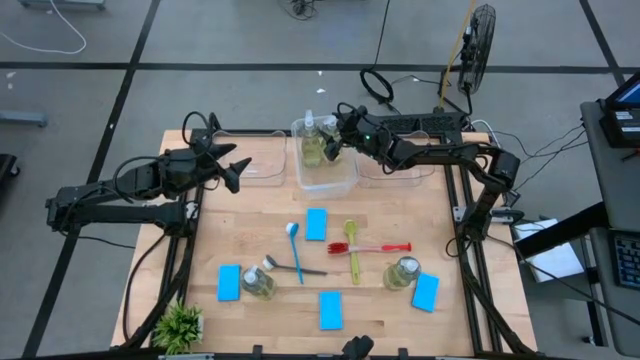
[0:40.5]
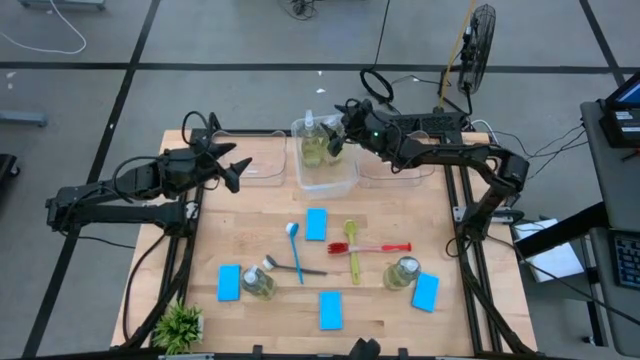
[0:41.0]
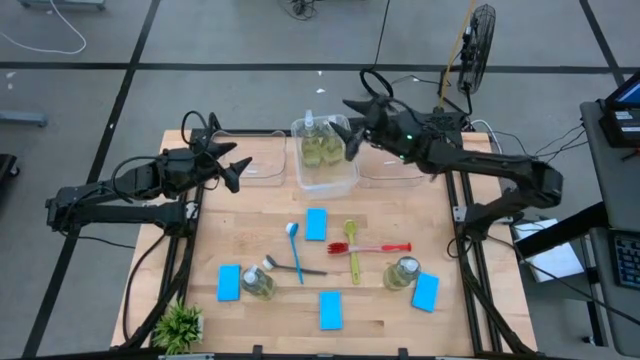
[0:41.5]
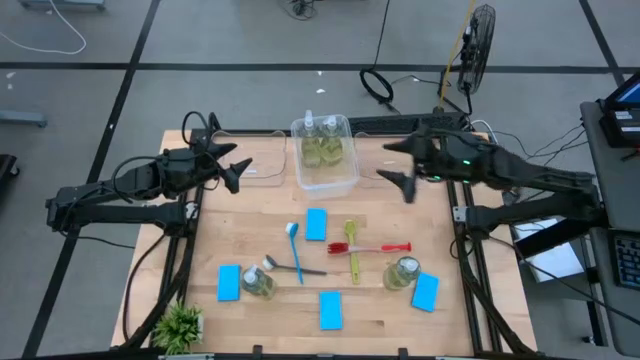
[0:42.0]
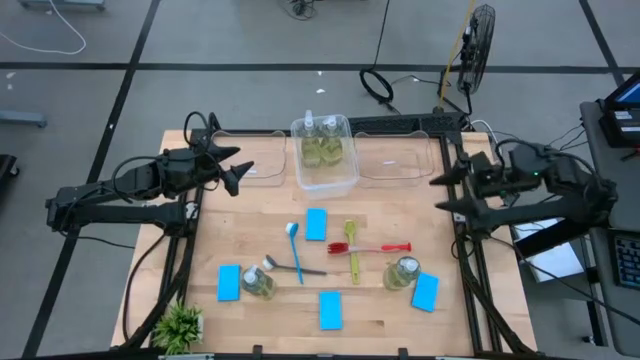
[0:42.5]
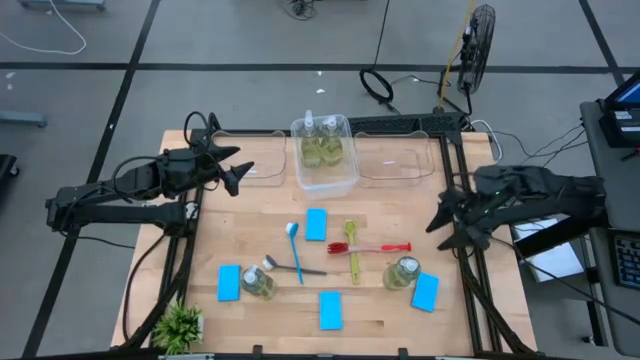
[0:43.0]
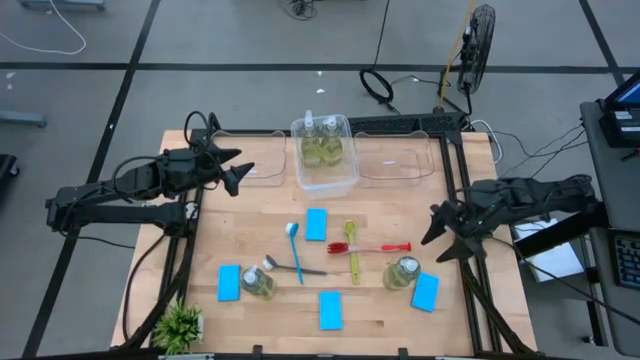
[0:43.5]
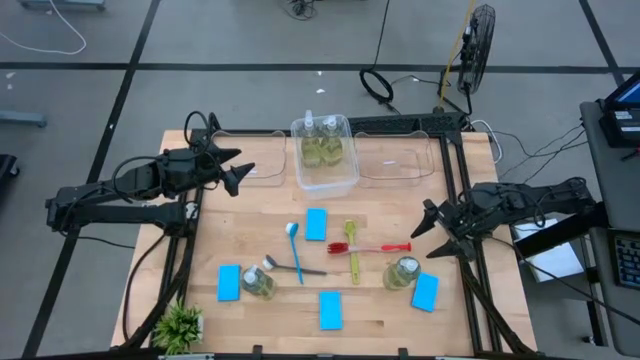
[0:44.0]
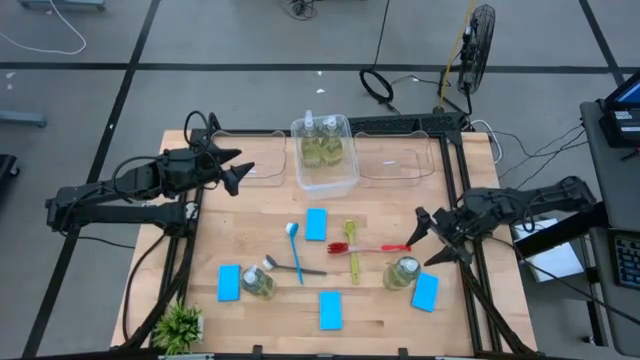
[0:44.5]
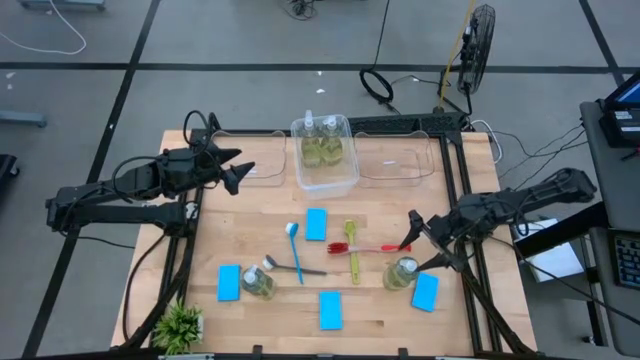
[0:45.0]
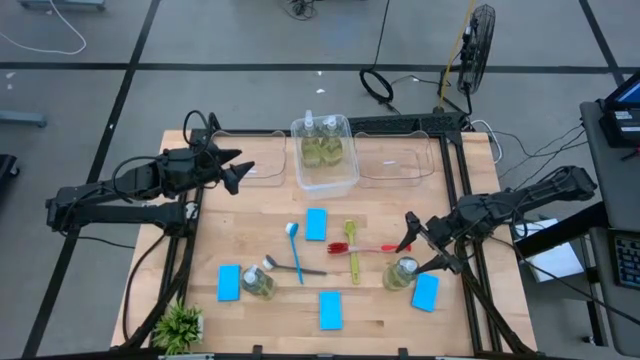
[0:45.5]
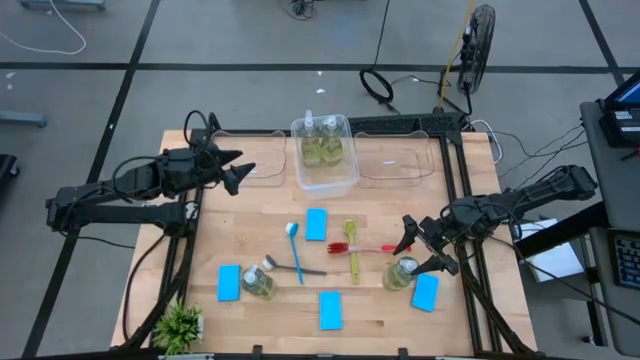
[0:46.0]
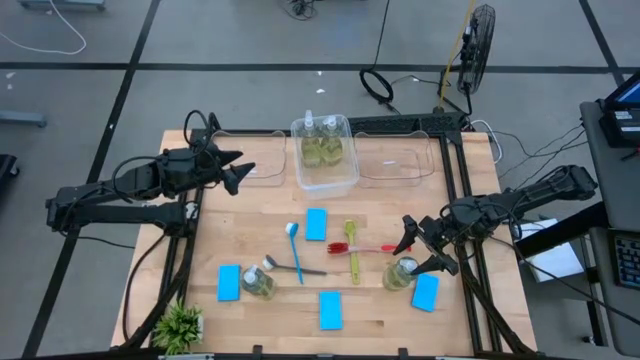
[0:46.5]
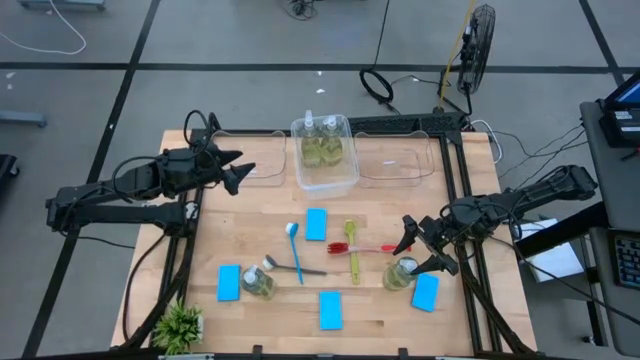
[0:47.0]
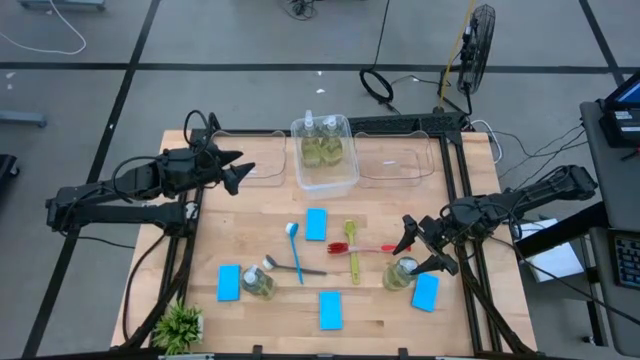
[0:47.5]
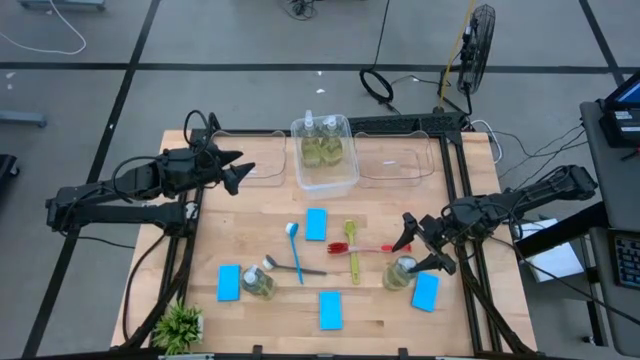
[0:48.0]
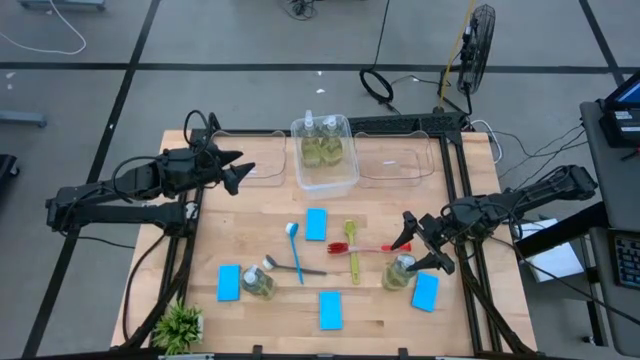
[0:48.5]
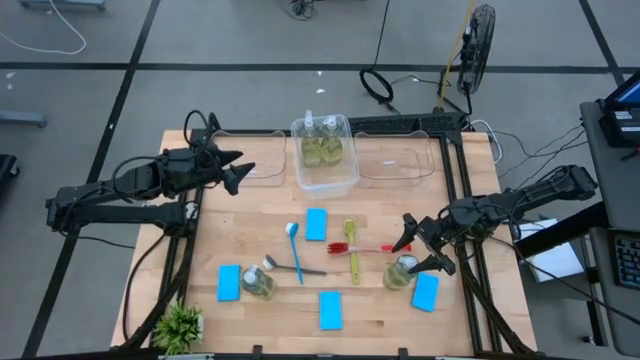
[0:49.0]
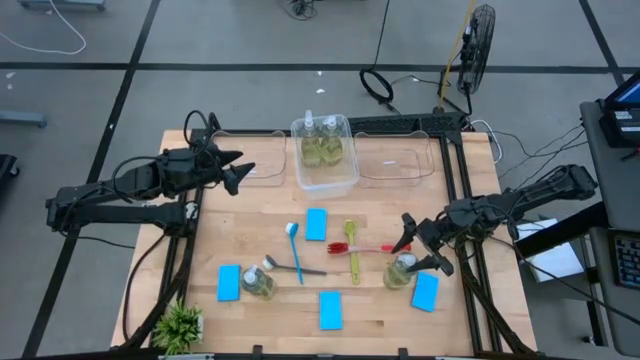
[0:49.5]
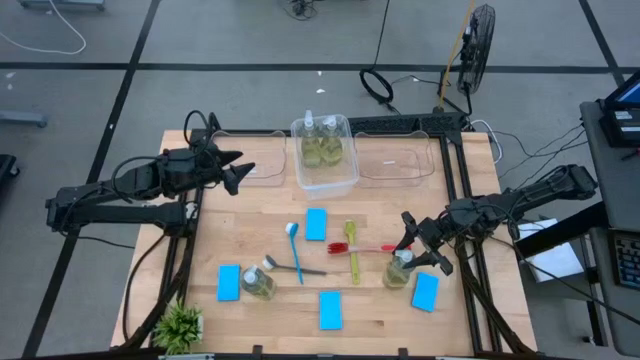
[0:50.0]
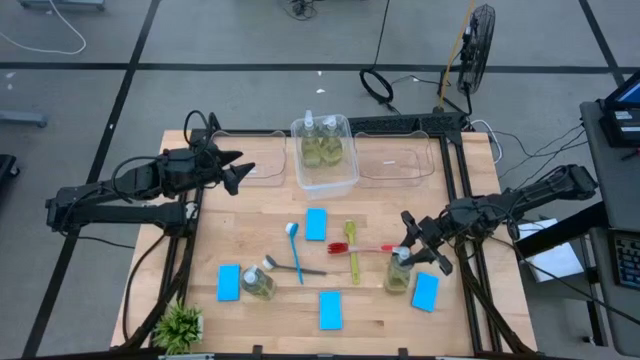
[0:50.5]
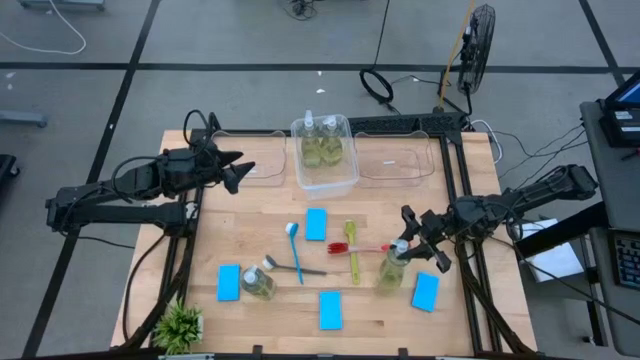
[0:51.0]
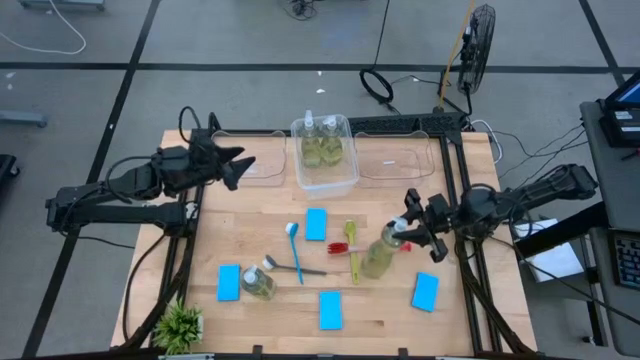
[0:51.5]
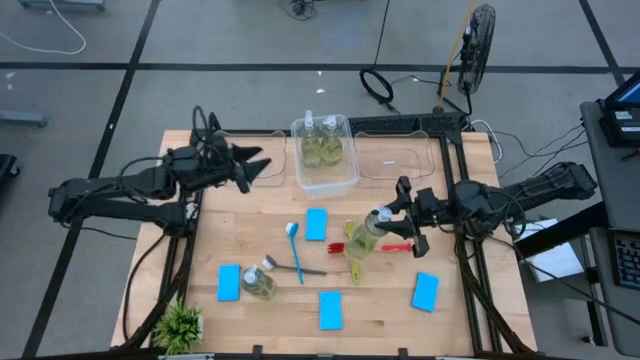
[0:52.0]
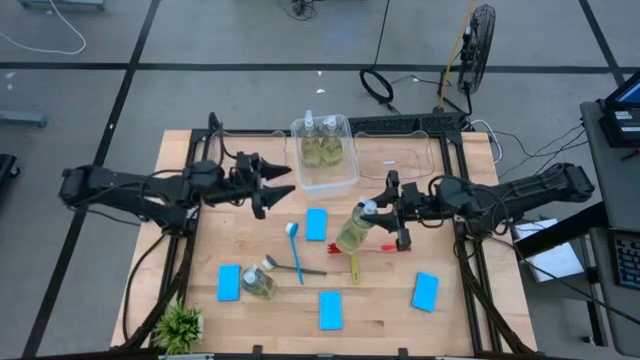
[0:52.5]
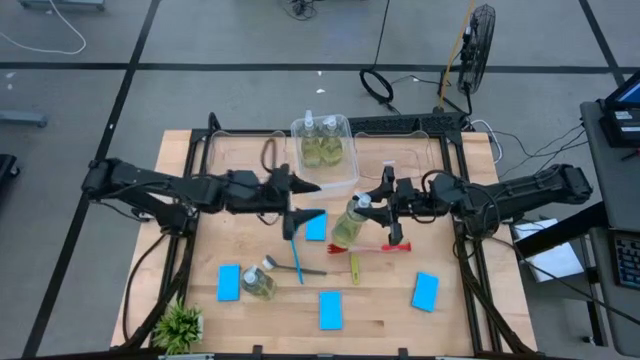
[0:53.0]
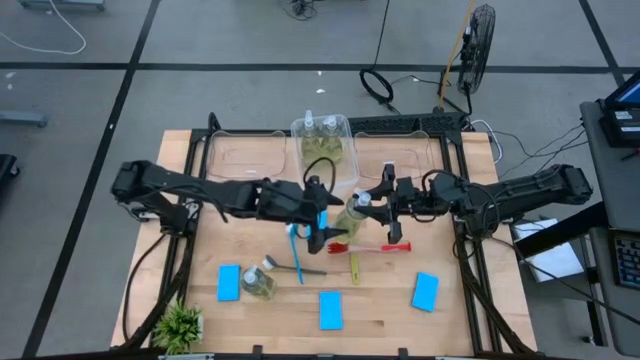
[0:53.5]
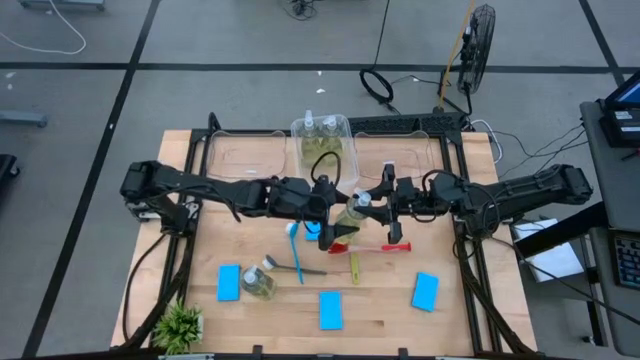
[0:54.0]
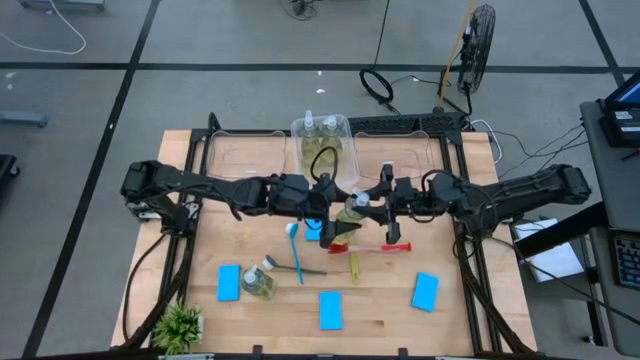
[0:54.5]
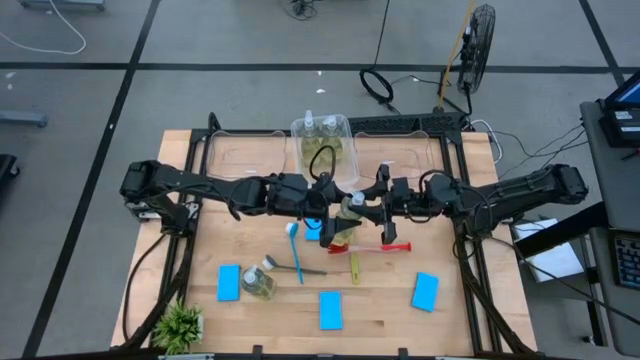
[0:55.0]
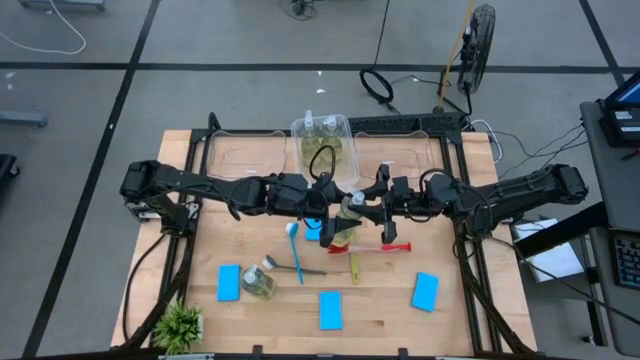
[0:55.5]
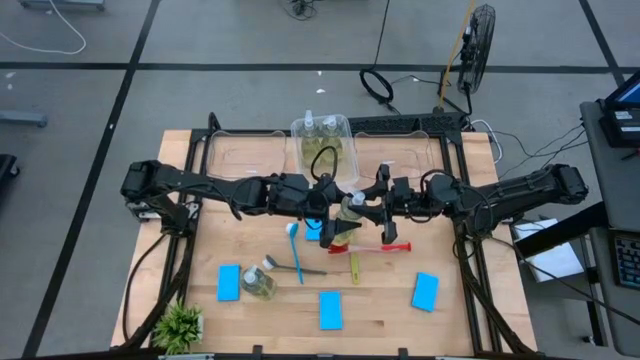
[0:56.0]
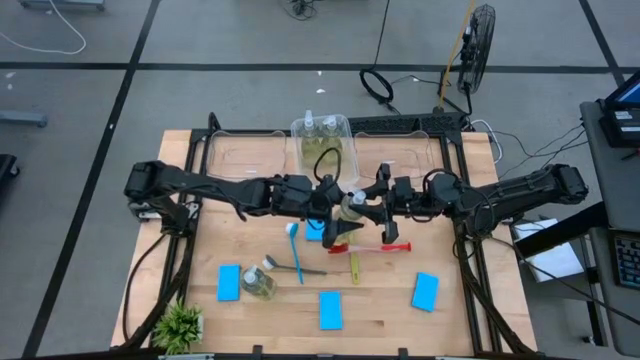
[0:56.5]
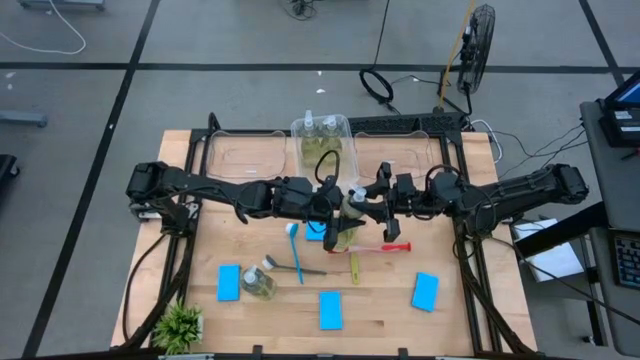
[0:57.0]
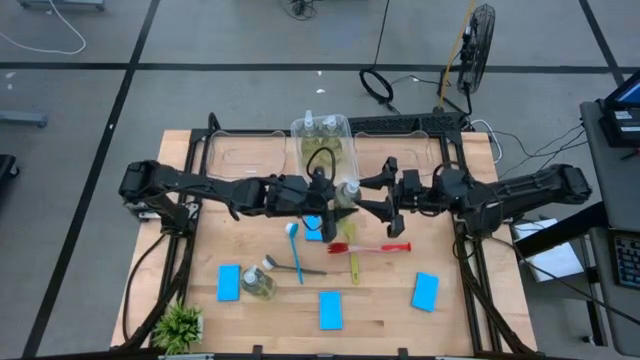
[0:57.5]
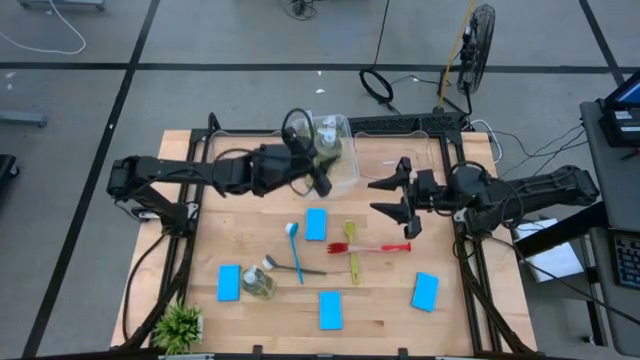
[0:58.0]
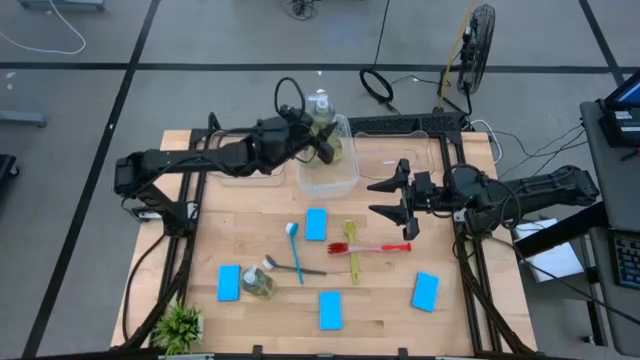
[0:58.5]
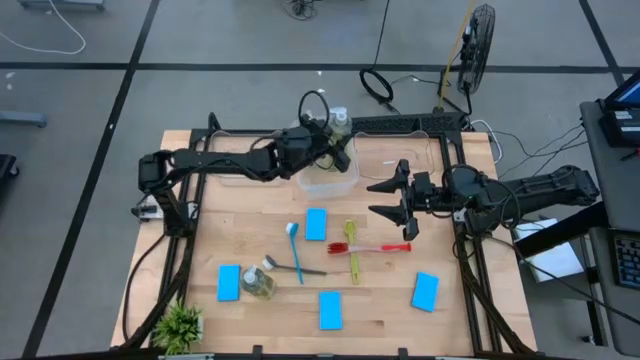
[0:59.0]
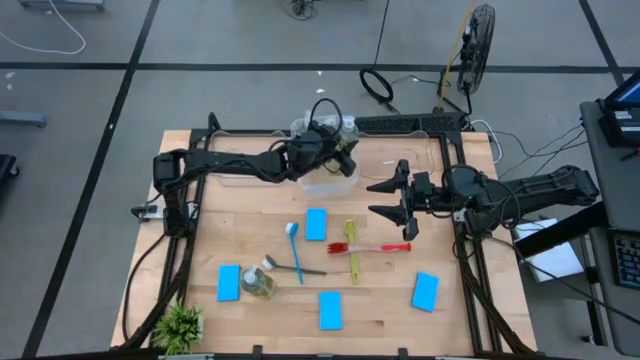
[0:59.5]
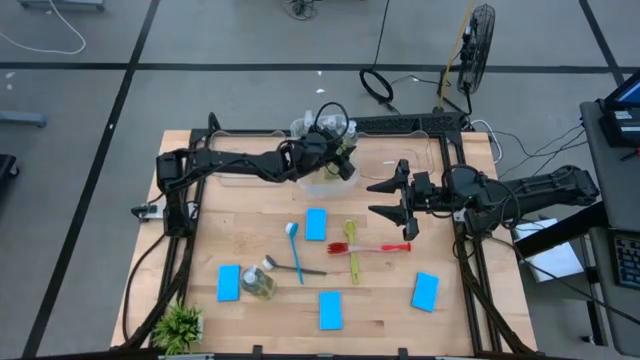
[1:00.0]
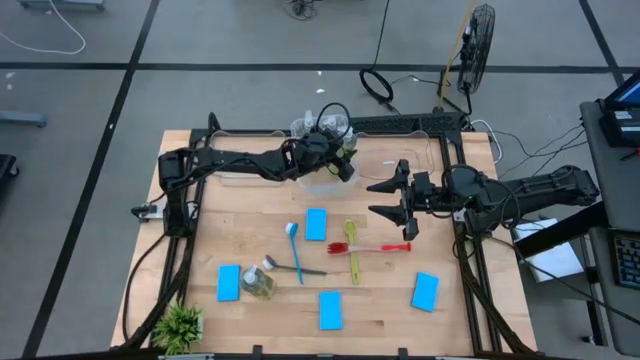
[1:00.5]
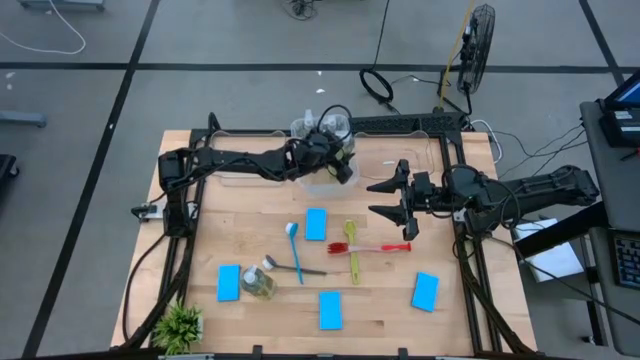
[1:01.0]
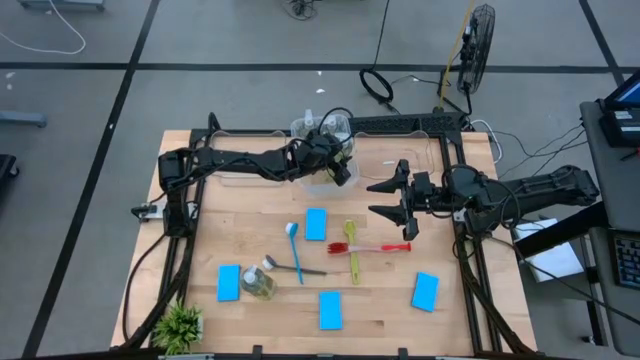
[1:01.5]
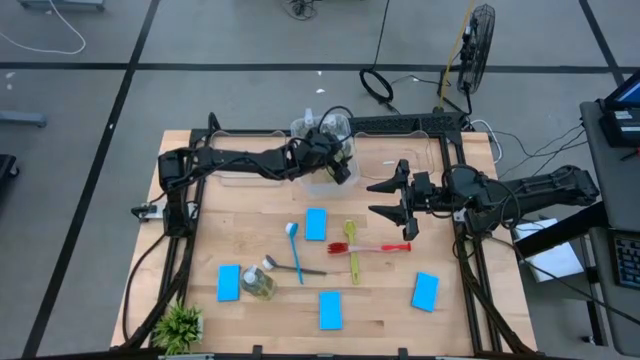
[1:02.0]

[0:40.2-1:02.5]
Task: Pick & Place Kitchen Sink Supplies
Put the yellow dish soap into the white bin
